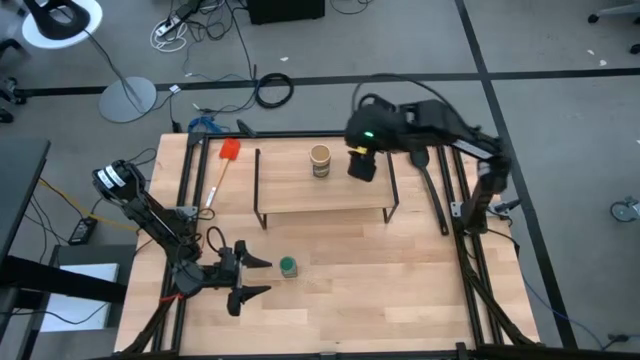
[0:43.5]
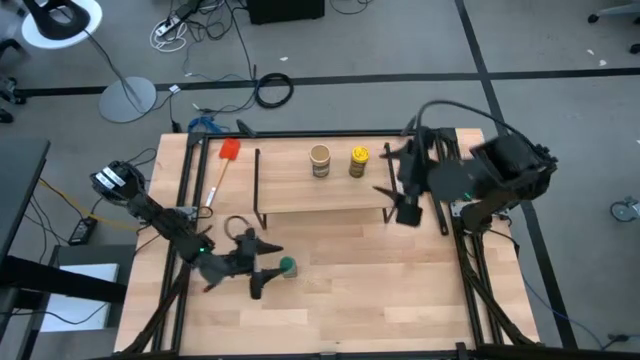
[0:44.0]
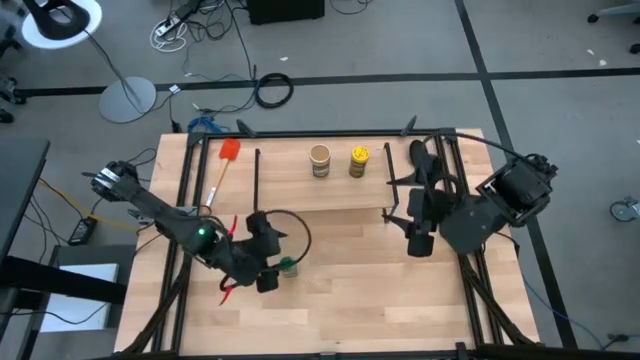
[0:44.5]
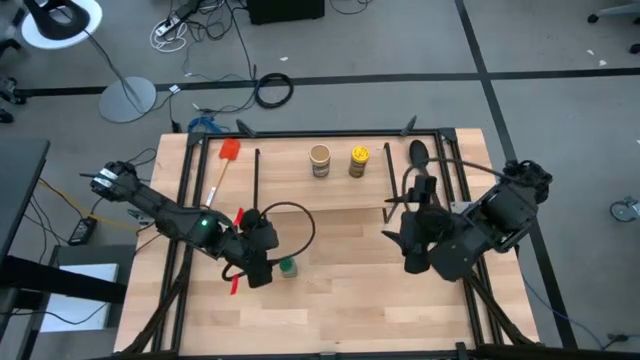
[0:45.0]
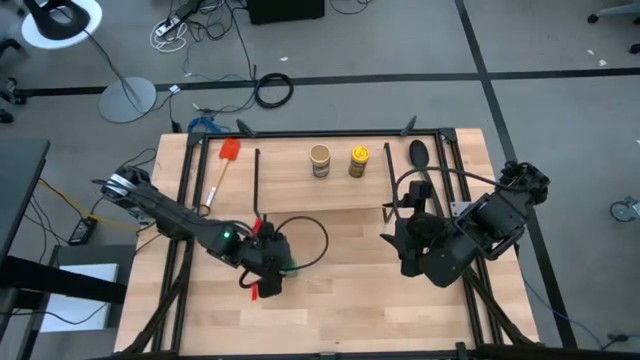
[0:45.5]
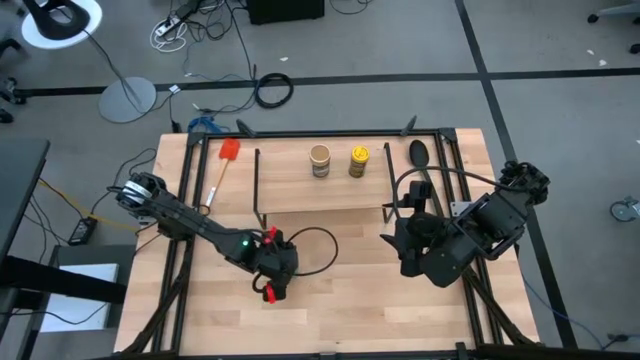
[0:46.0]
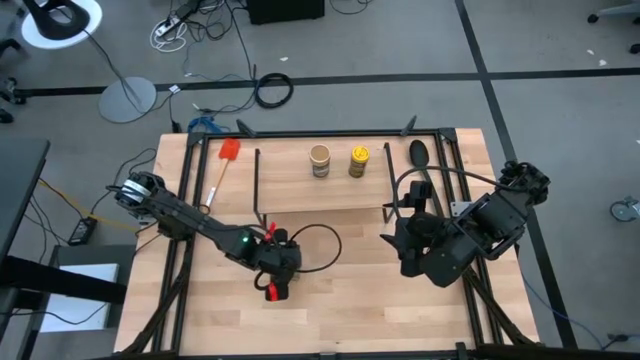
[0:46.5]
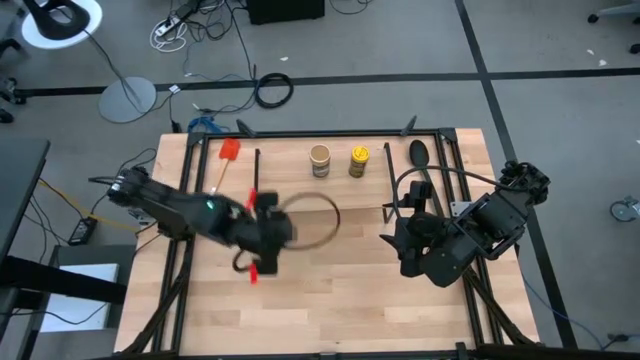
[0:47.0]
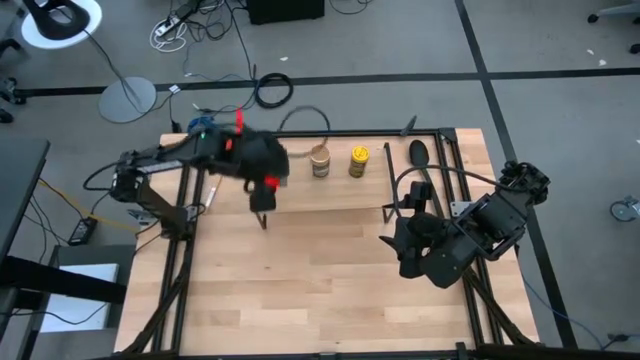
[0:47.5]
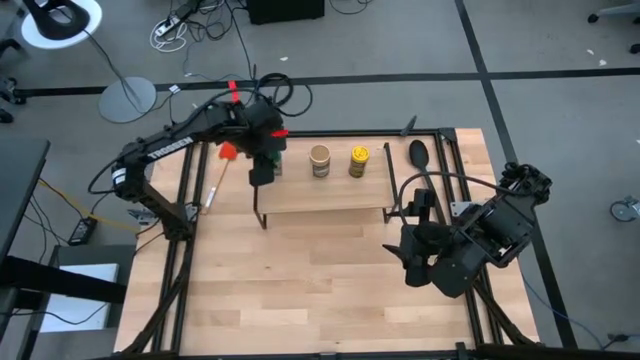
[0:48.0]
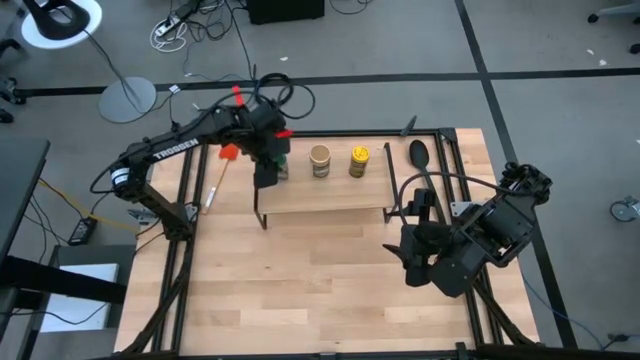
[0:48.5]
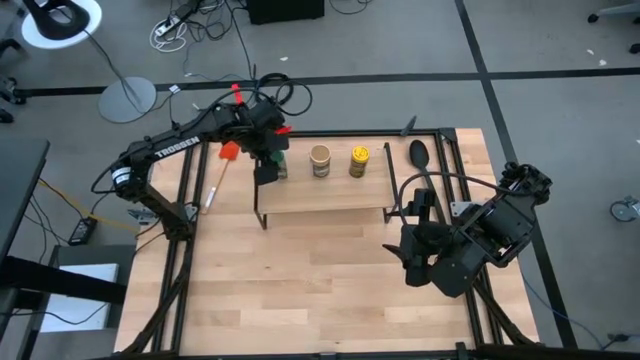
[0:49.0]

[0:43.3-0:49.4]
Task: Shelf spices
Put the green seasoning bottle on the shelf

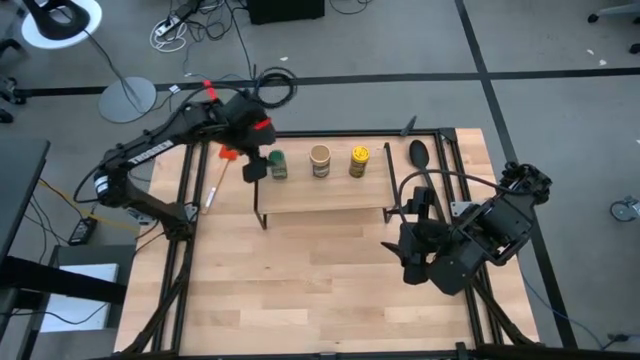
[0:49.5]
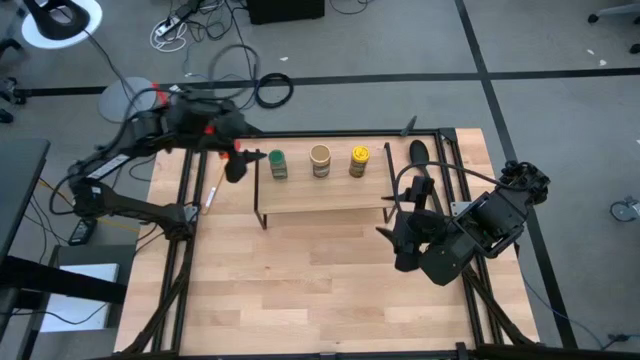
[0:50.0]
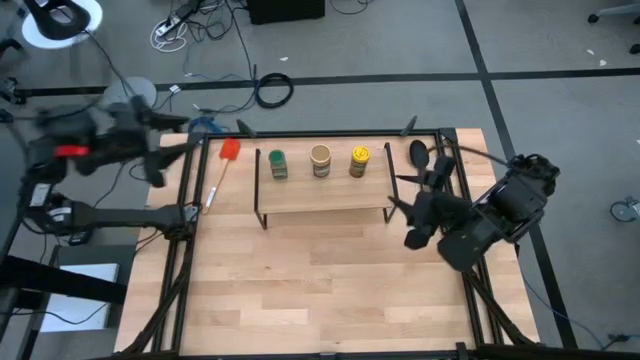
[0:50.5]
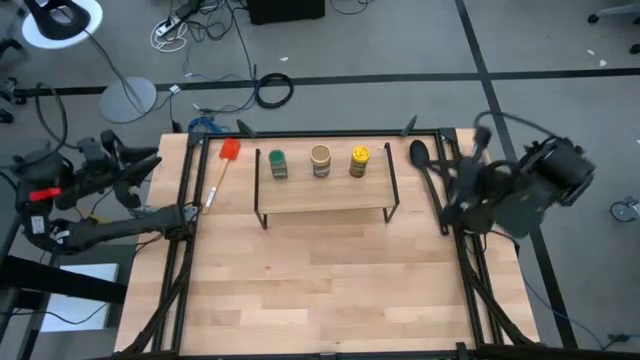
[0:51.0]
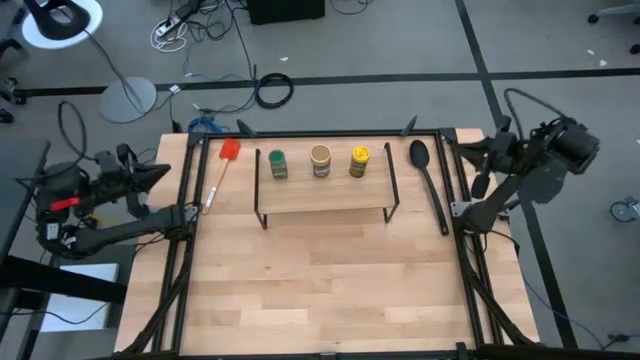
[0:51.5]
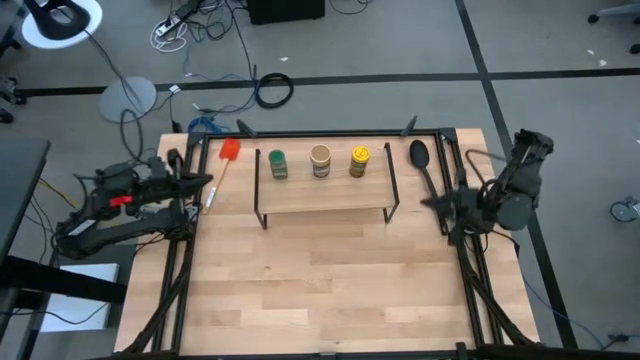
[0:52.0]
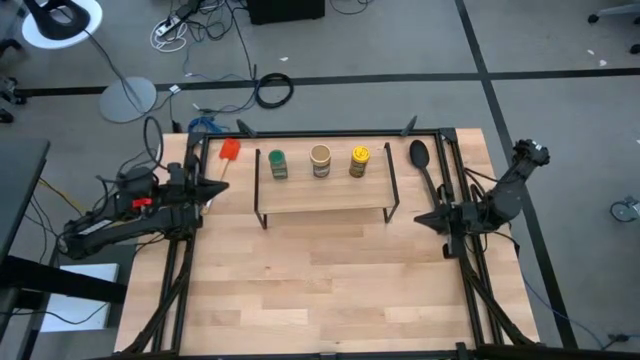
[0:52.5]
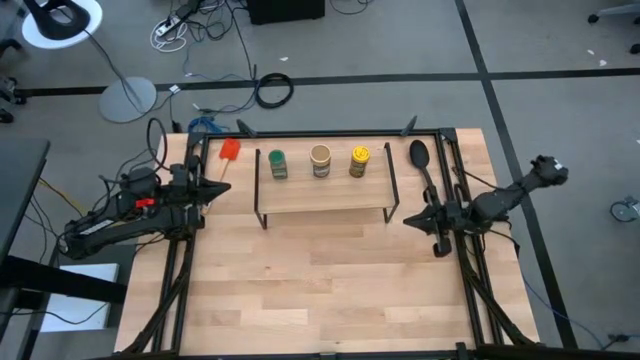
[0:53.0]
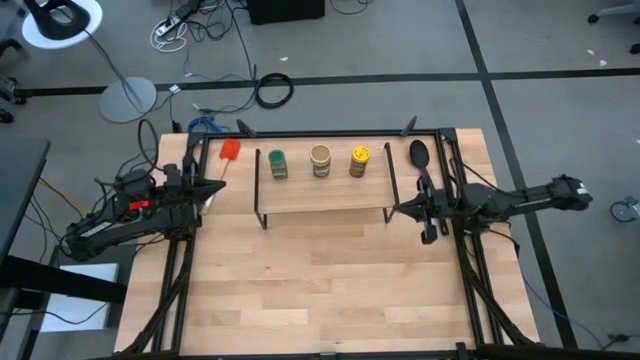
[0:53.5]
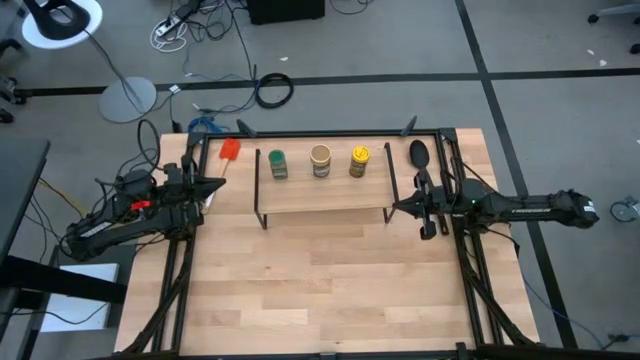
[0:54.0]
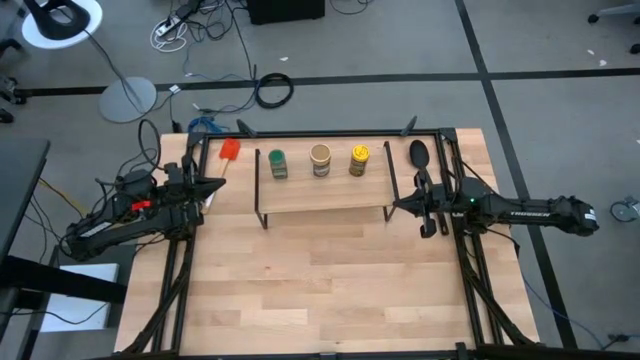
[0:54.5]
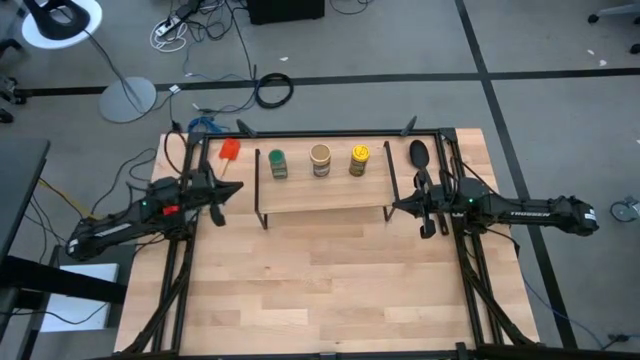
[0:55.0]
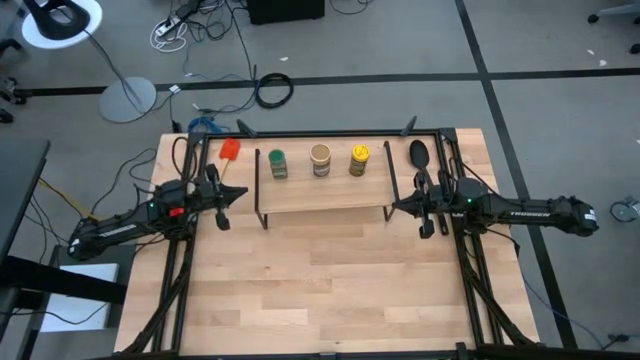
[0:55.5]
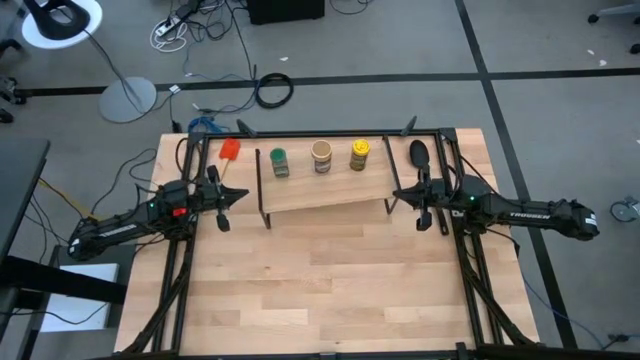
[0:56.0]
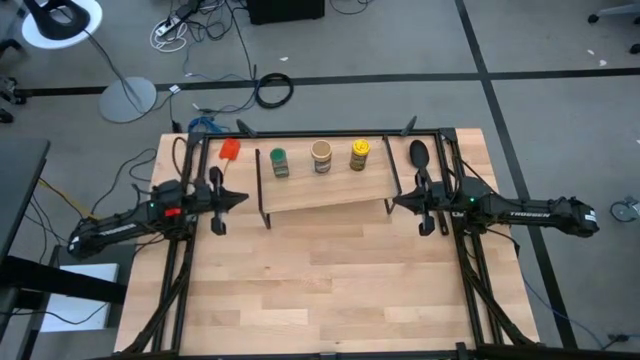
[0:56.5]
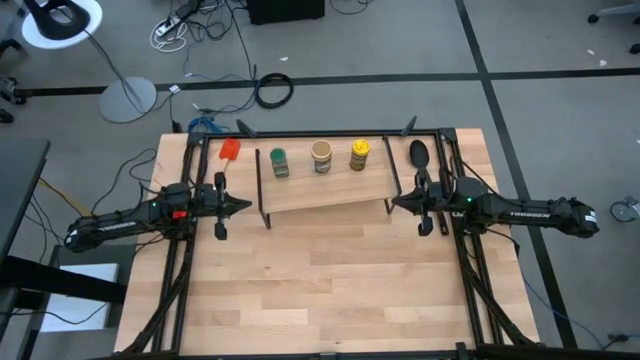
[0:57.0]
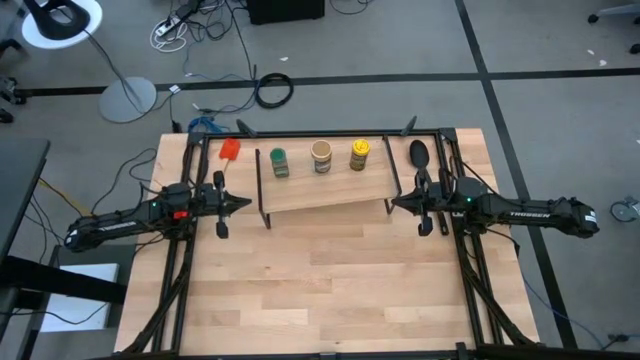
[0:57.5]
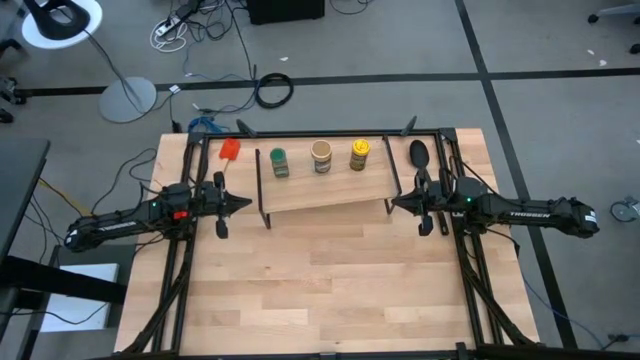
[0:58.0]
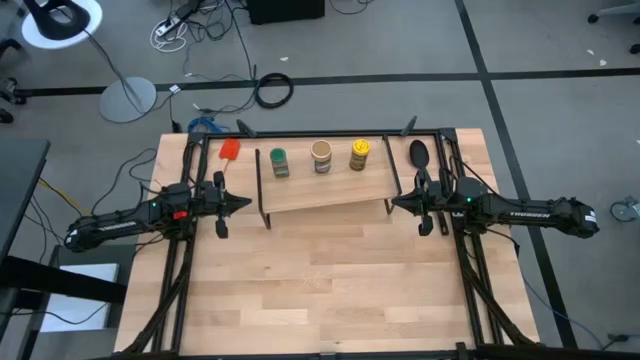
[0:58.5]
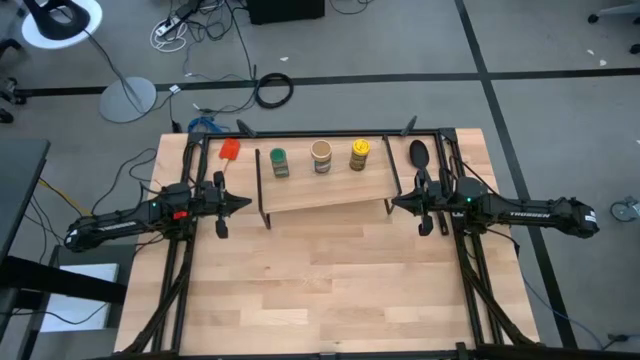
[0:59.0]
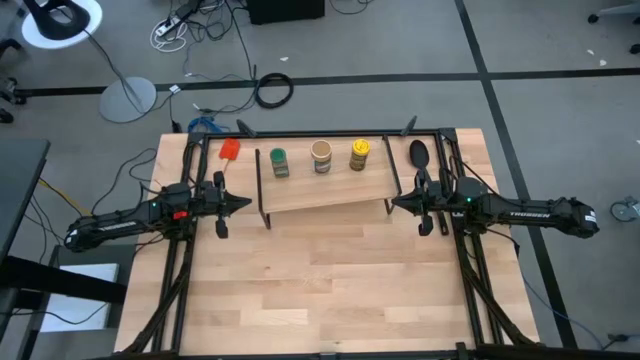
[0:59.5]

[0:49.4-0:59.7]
Return to Home Position

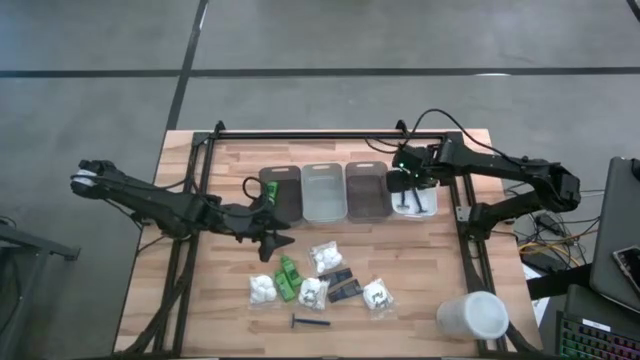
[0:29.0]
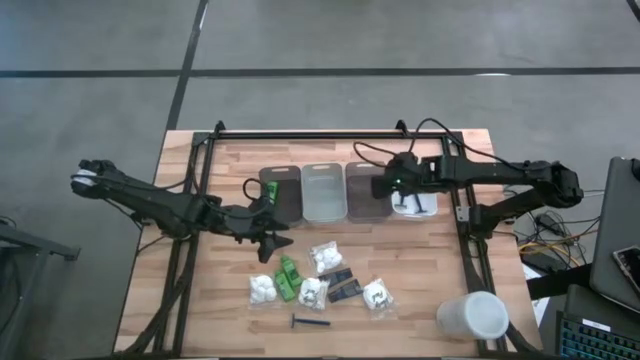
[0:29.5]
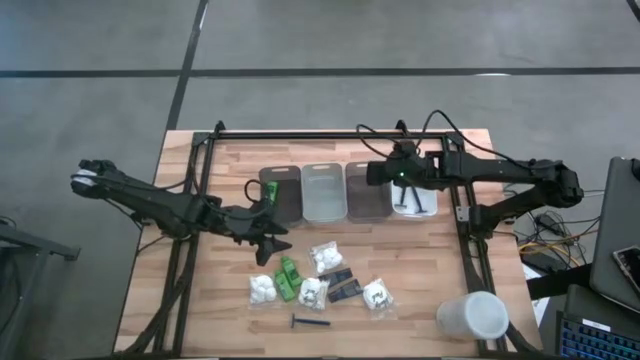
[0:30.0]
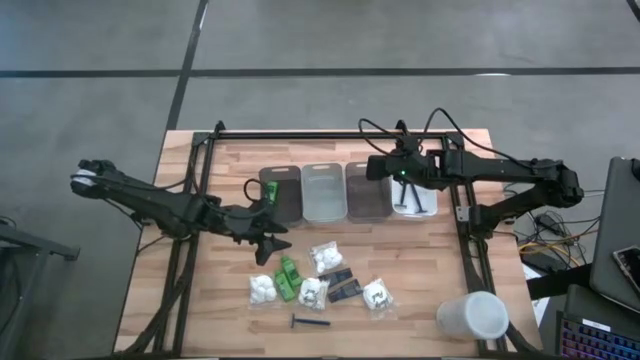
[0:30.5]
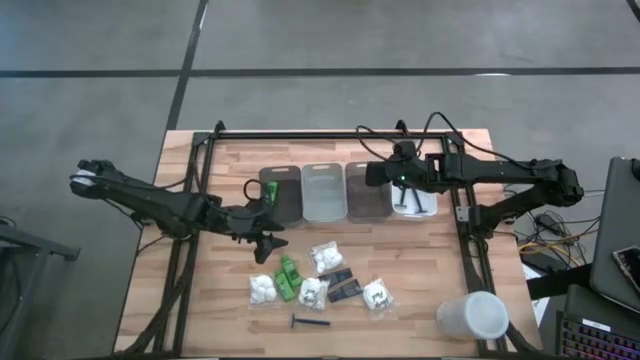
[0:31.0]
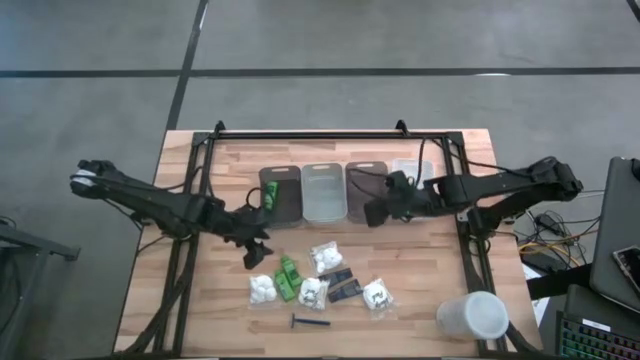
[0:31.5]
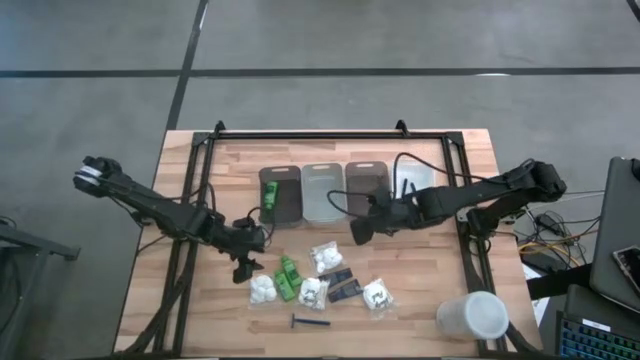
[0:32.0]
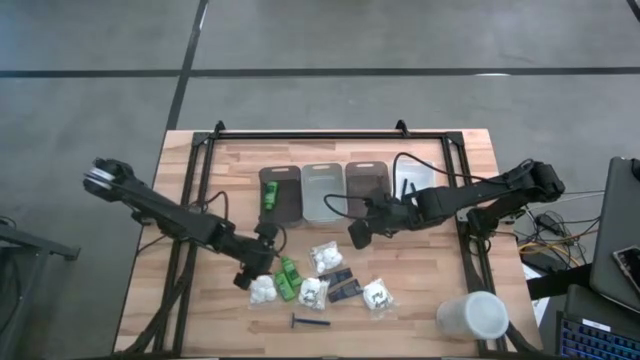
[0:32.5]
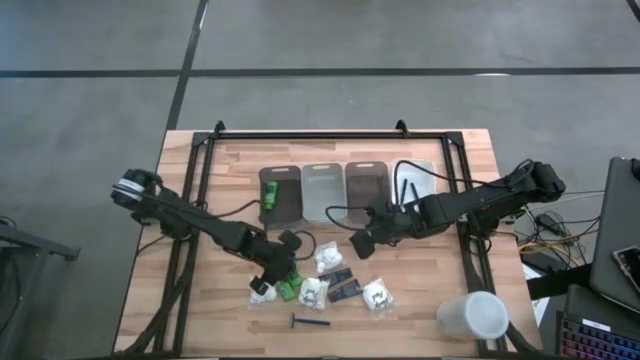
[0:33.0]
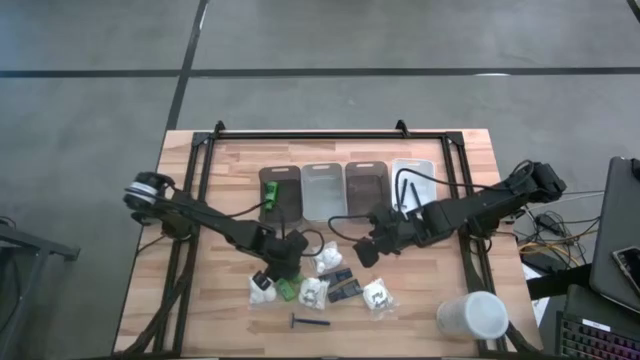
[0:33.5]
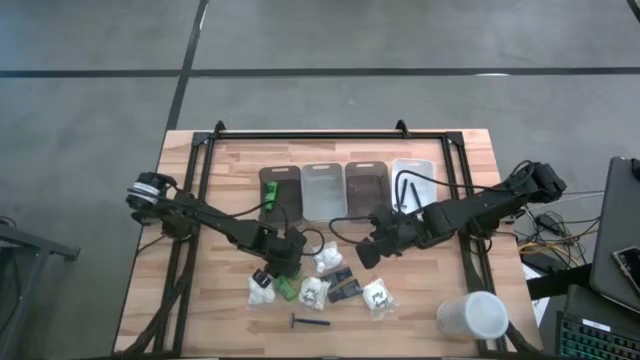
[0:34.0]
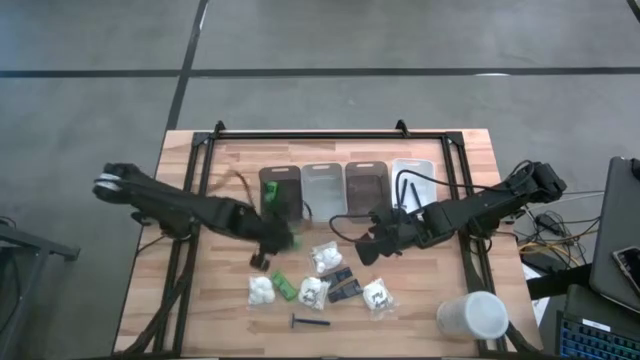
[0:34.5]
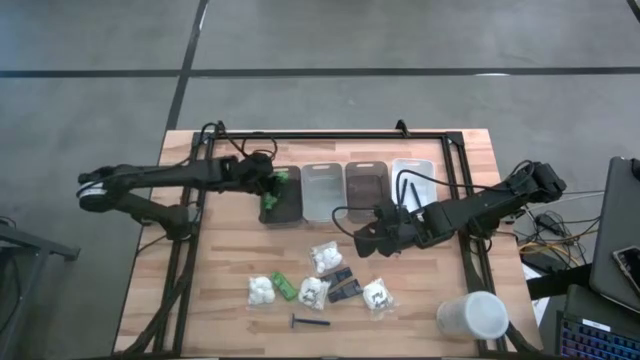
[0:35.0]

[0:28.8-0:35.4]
Task: Pick & Place Travel size toiletries
Put the top shampoo into the left black bin
